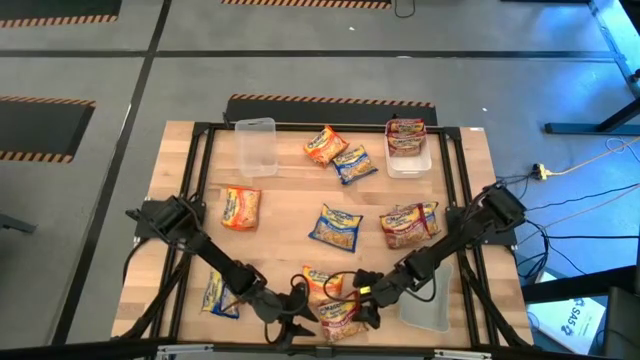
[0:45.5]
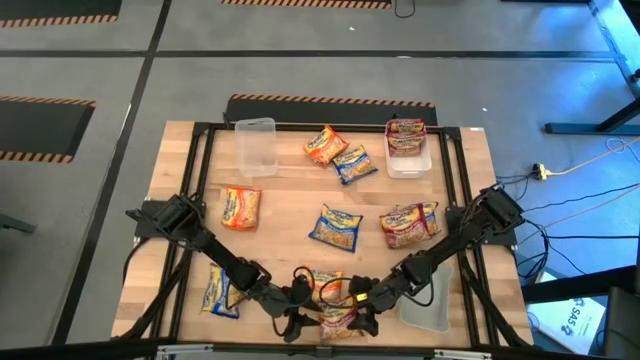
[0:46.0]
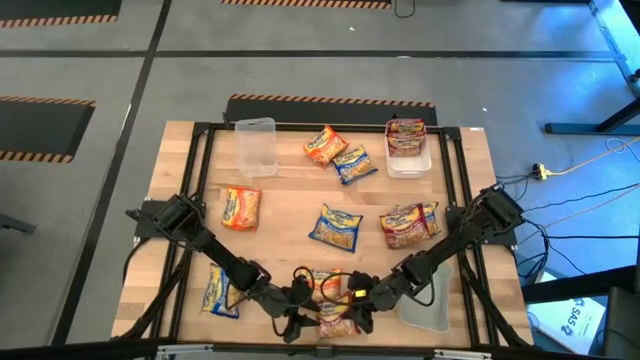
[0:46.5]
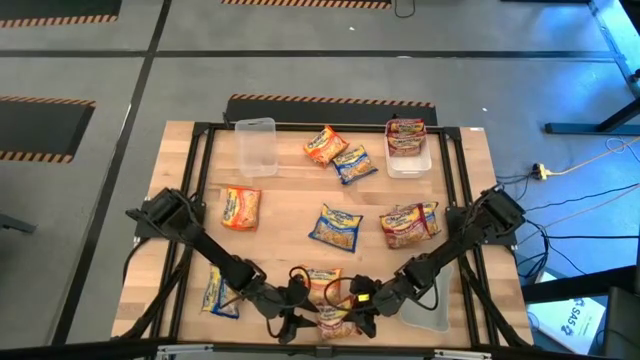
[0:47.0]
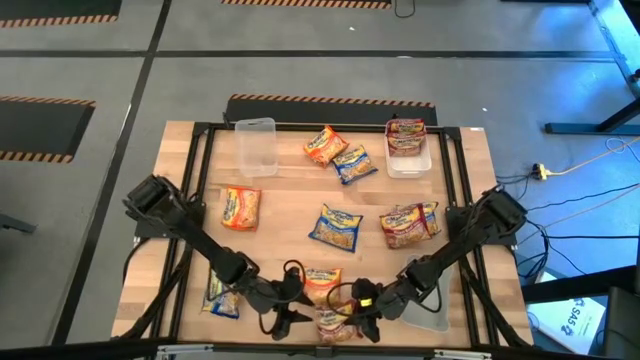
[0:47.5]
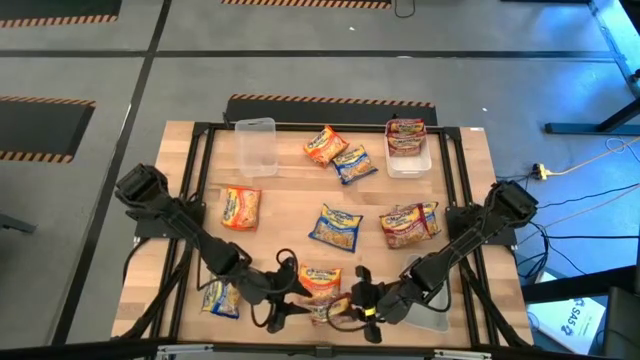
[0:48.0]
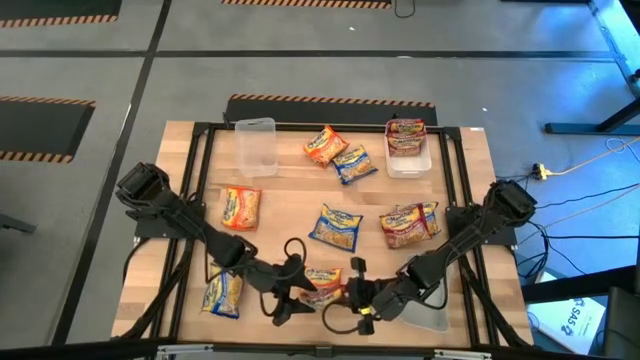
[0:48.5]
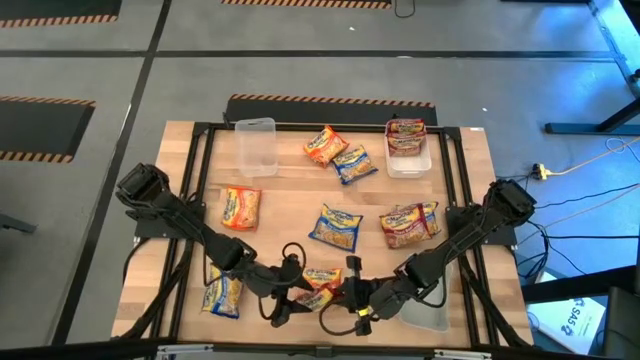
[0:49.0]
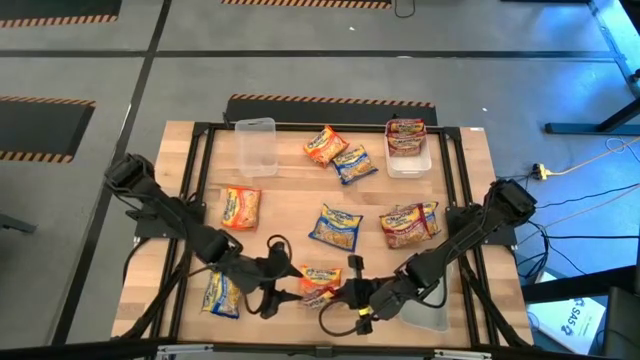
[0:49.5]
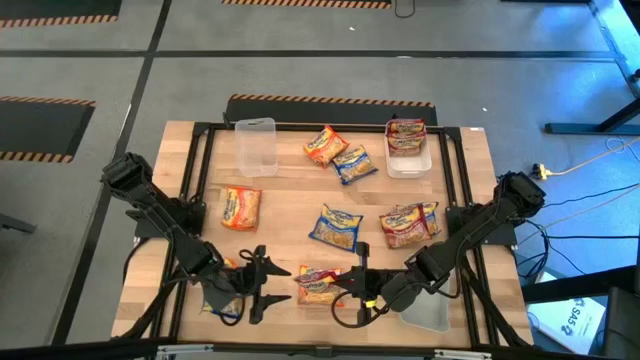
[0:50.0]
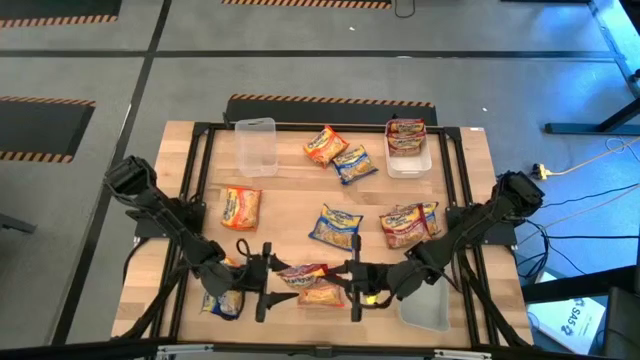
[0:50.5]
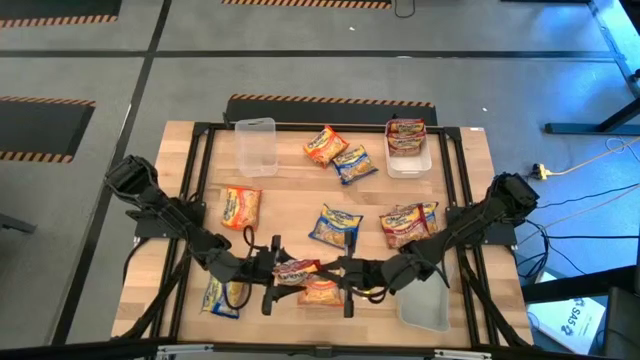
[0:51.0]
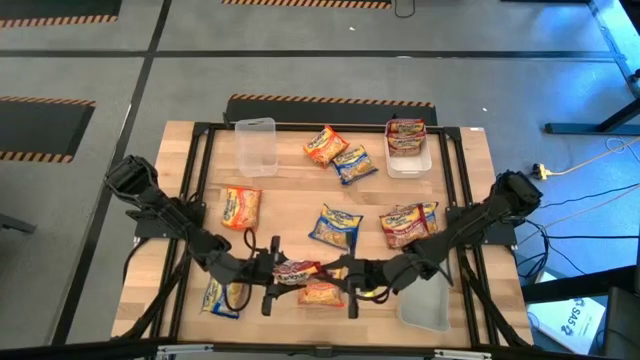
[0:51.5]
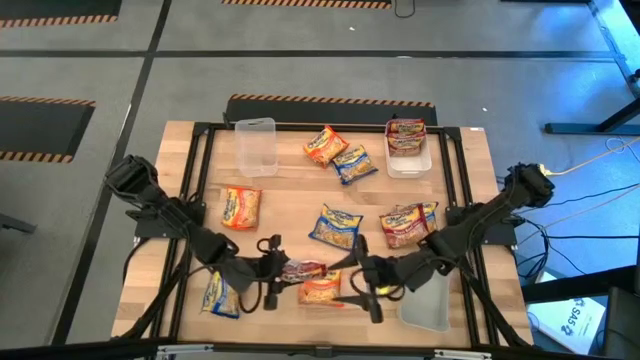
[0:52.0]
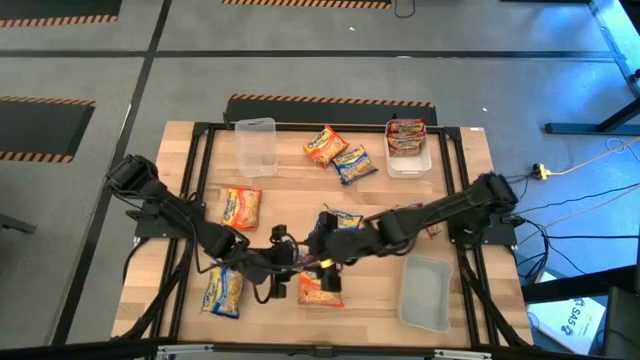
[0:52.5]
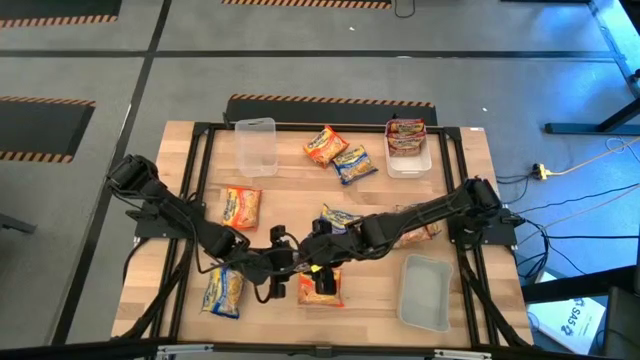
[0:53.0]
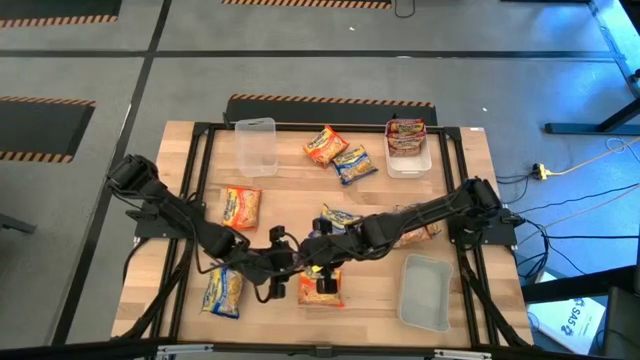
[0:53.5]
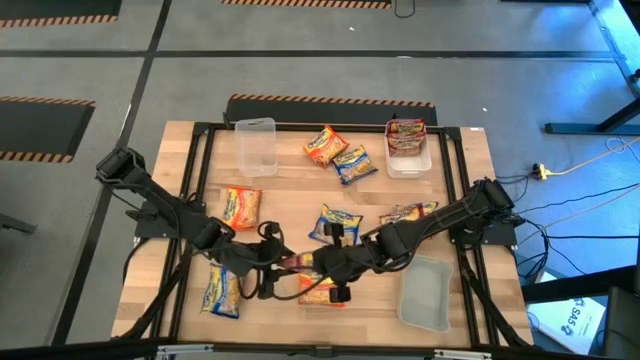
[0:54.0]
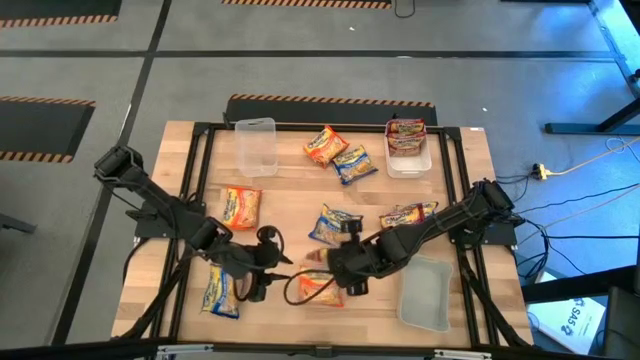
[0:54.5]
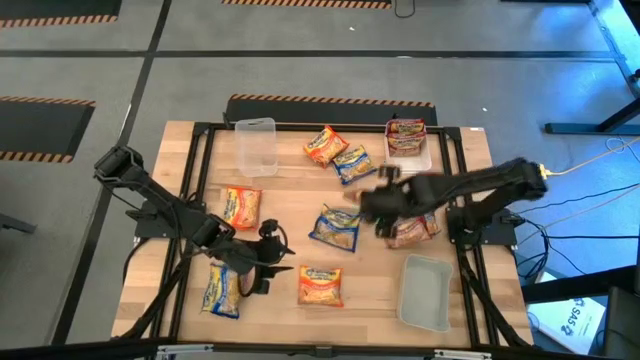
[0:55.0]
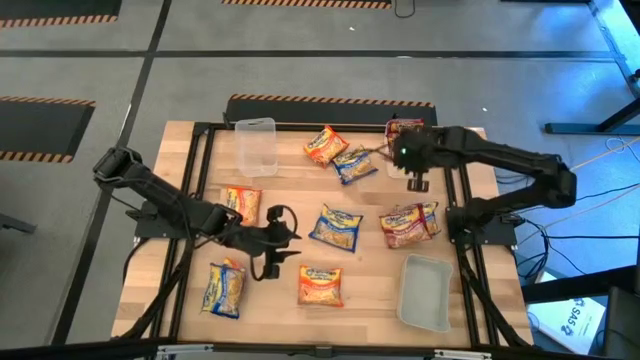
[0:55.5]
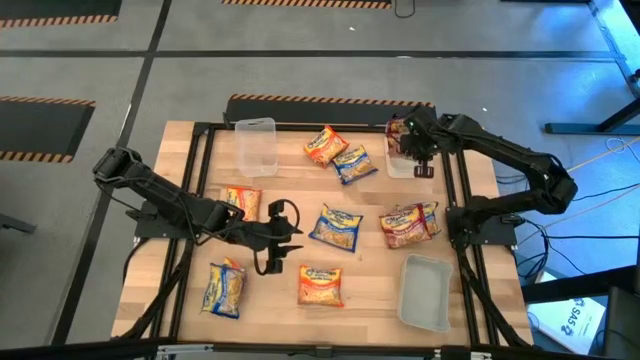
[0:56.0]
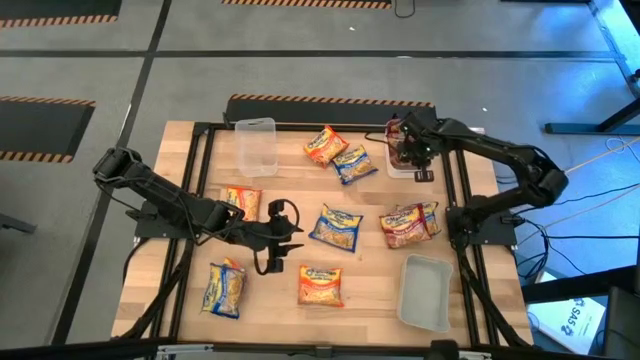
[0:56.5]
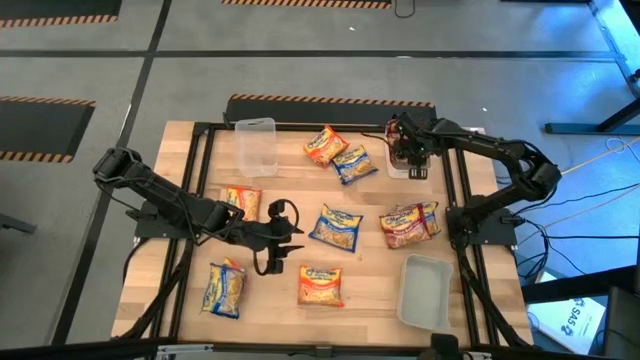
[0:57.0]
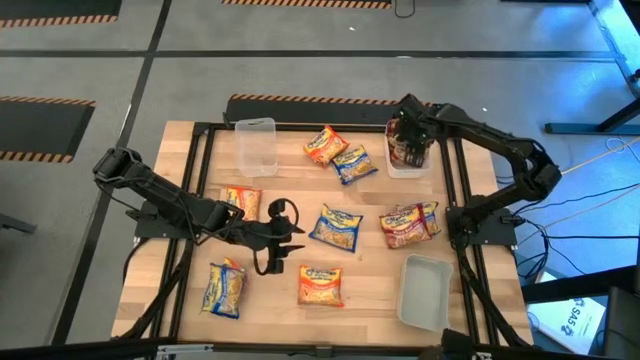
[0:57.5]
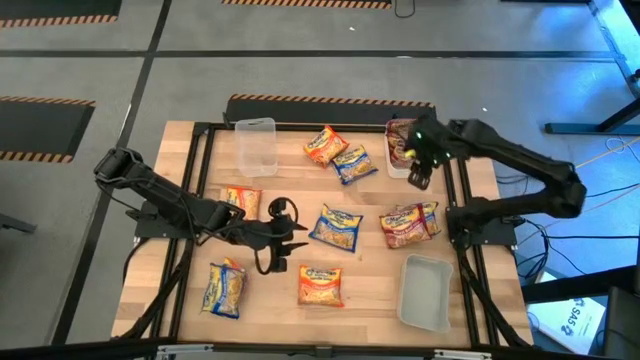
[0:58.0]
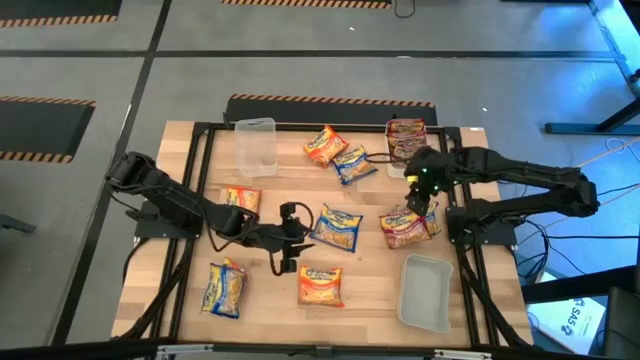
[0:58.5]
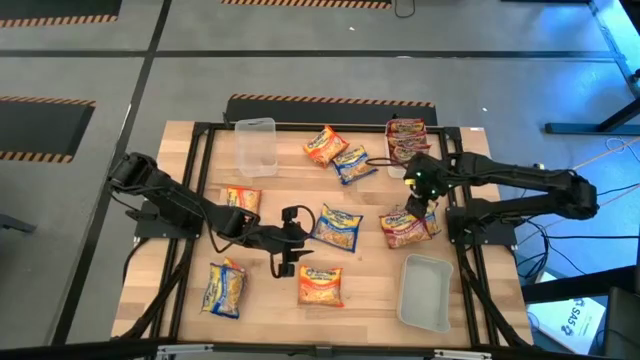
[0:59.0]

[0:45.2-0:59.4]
Task: Sort Maruchan noodles
Put the bottom red noodle pack into the white bin

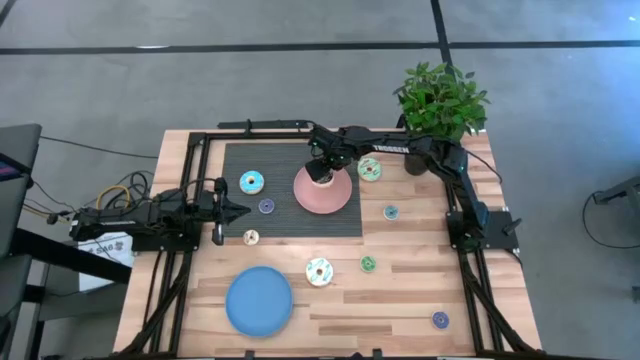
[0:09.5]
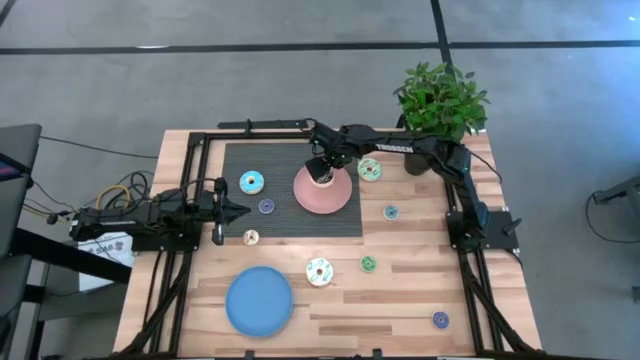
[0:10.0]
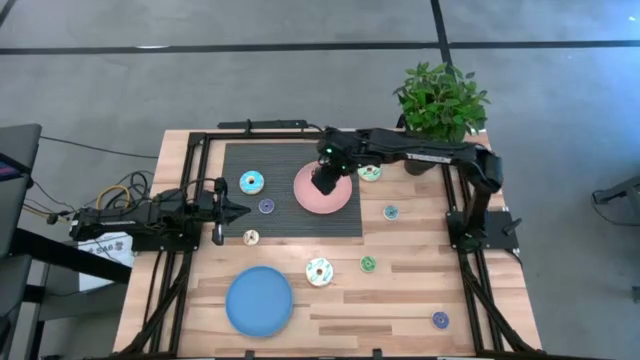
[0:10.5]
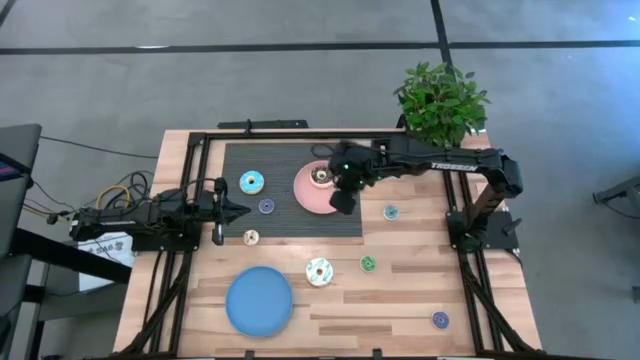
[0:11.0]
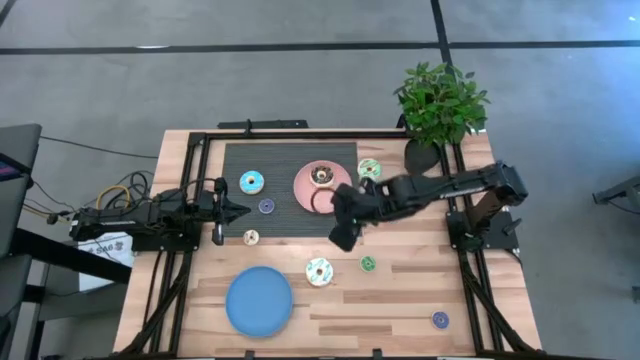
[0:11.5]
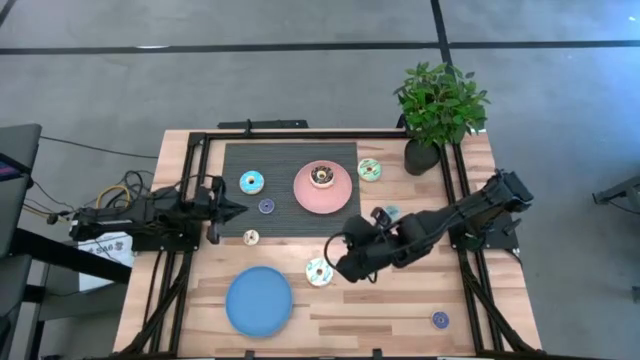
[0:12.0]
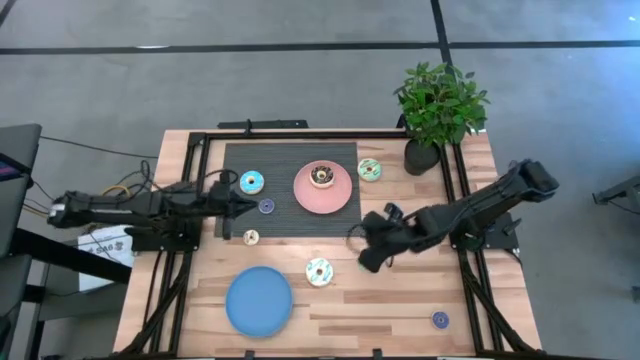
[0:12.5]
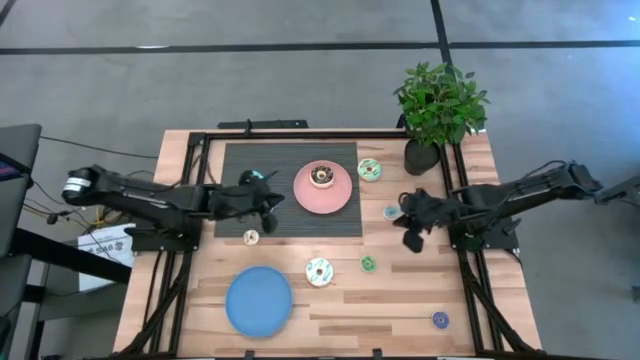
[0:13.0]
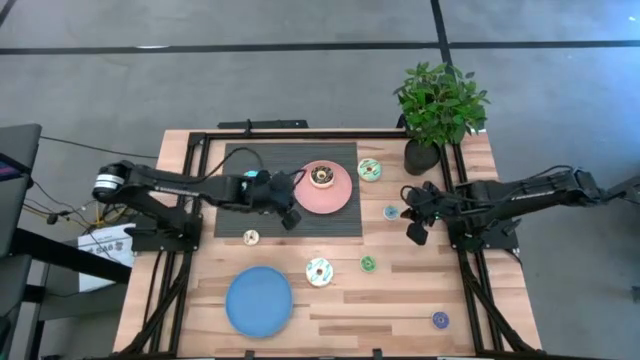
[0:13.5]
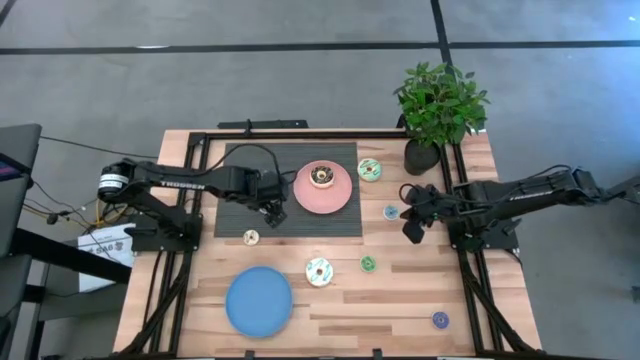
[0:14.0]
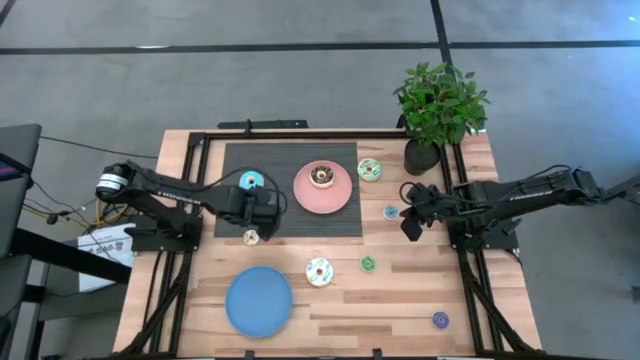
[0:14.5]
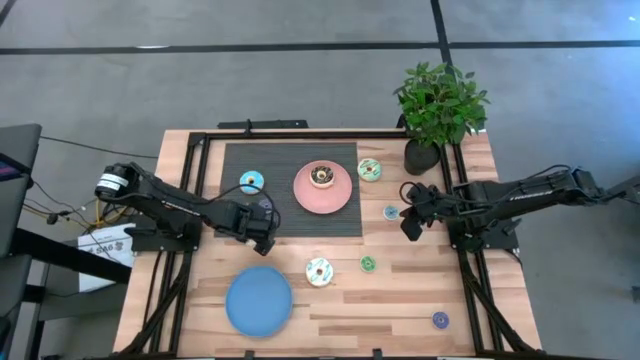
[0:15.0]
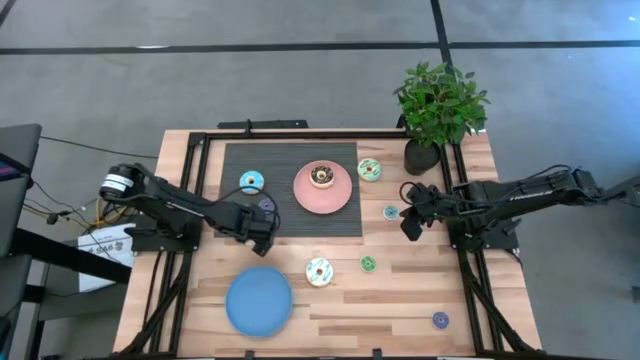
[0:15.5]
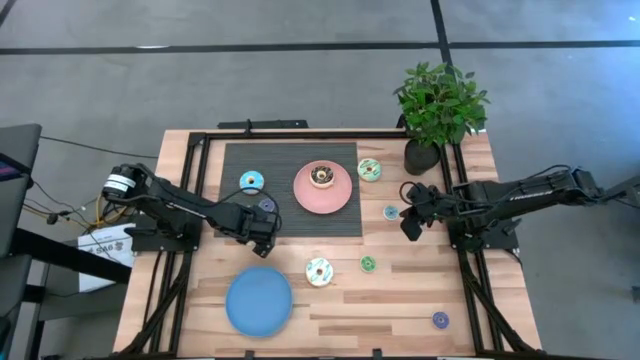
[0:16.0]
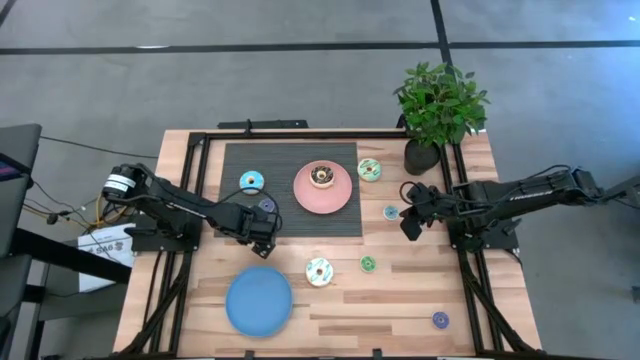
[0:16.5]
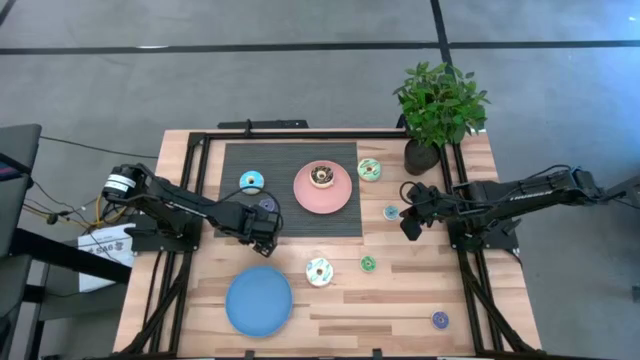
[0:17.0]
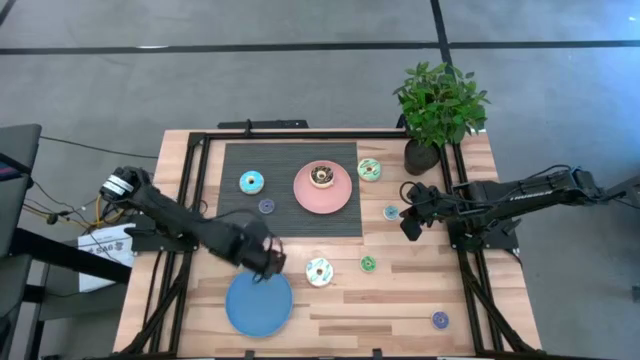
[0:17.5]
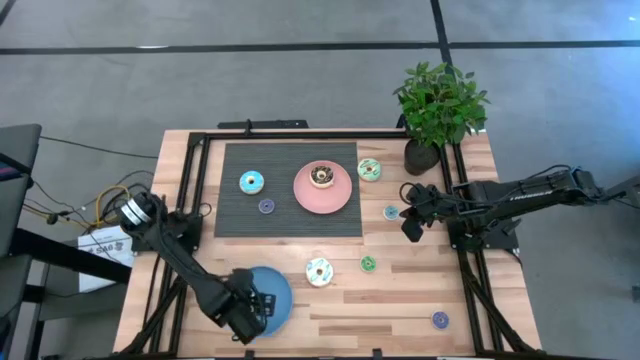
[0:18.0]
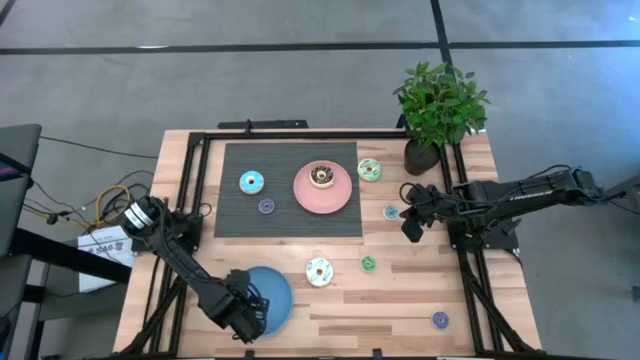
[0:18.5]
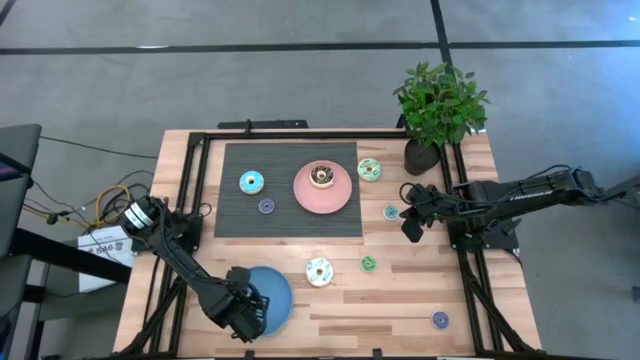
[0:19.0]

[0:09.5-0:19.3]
Task: Pick & Place donuts
Put the small white donut on the blue plate
